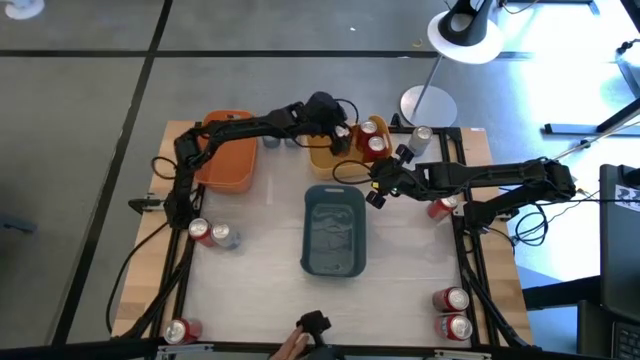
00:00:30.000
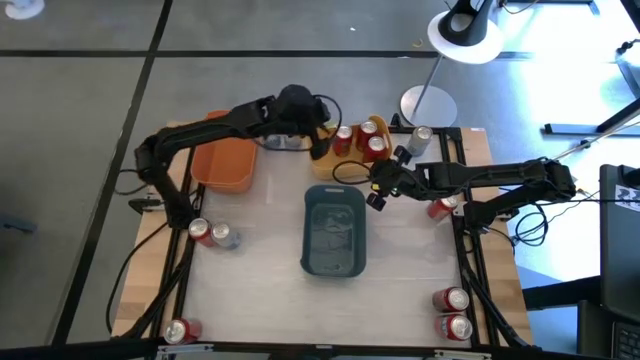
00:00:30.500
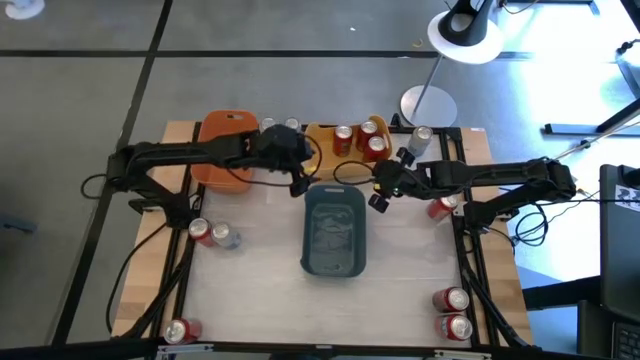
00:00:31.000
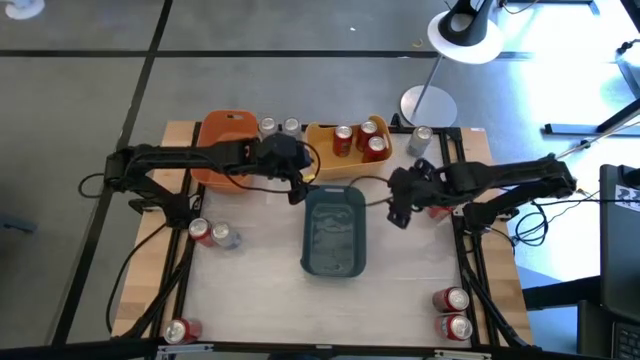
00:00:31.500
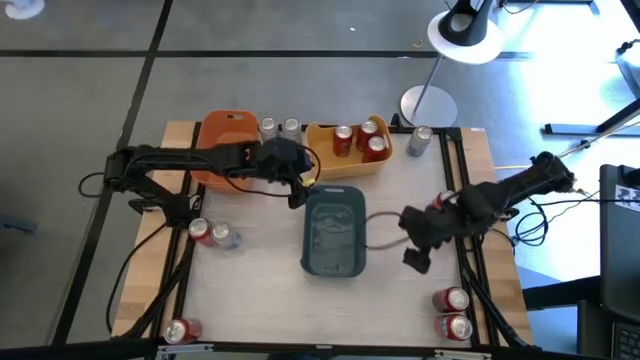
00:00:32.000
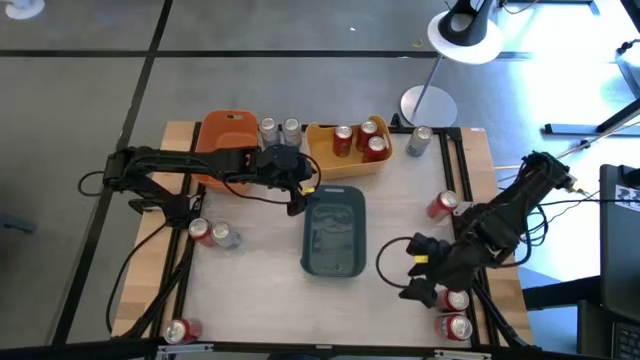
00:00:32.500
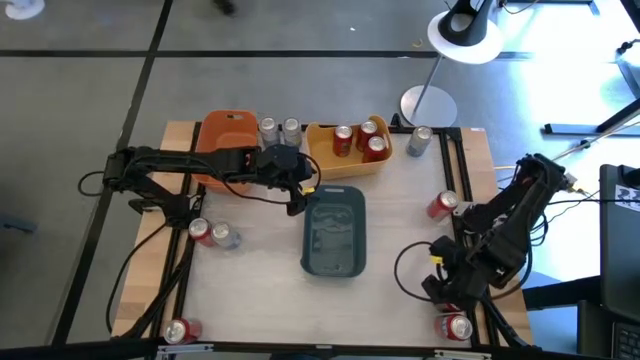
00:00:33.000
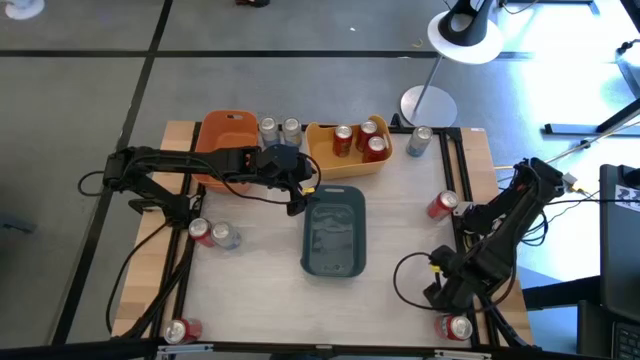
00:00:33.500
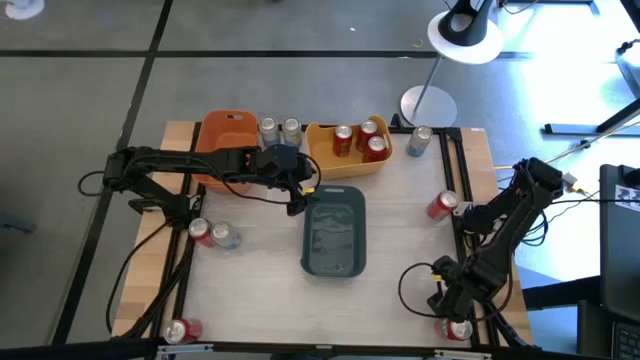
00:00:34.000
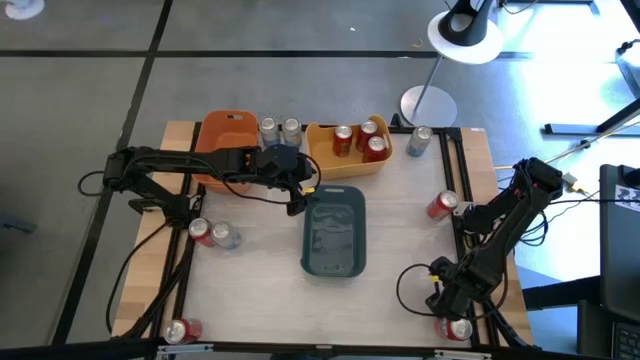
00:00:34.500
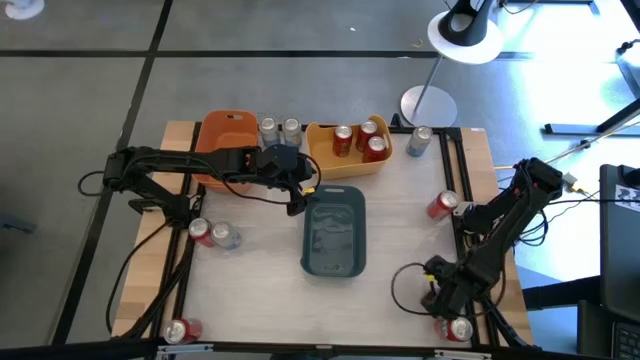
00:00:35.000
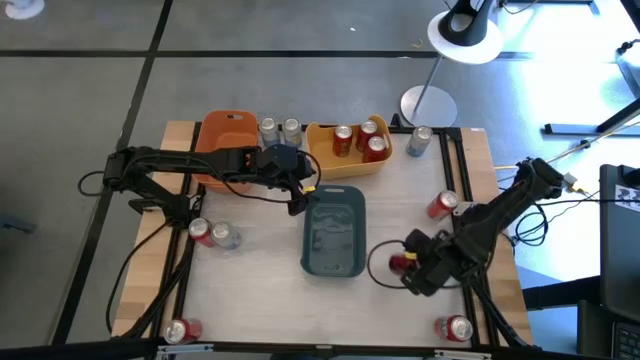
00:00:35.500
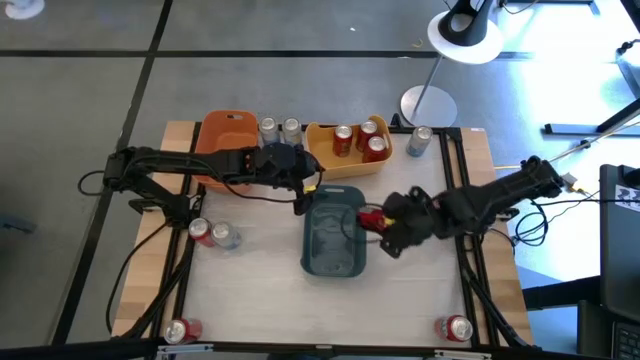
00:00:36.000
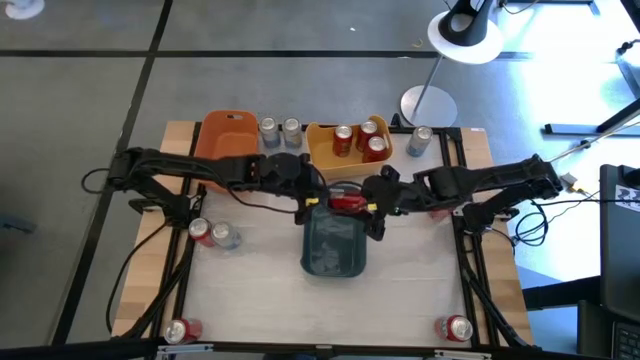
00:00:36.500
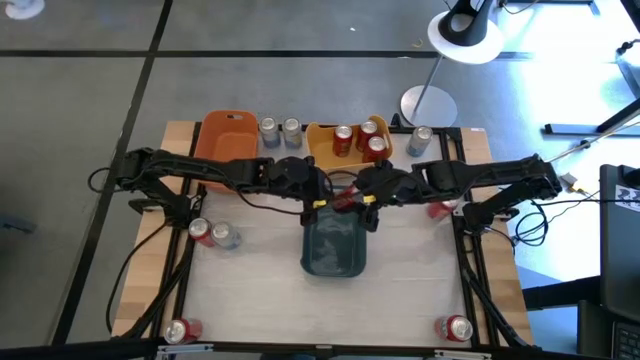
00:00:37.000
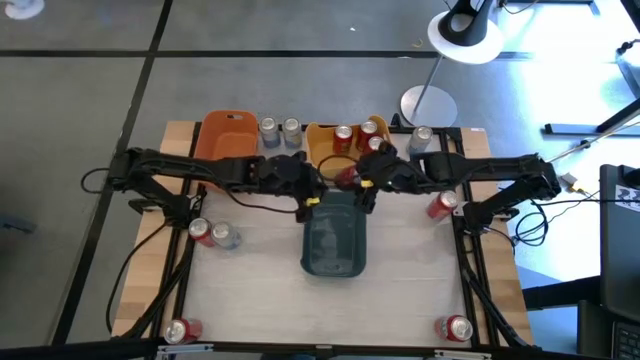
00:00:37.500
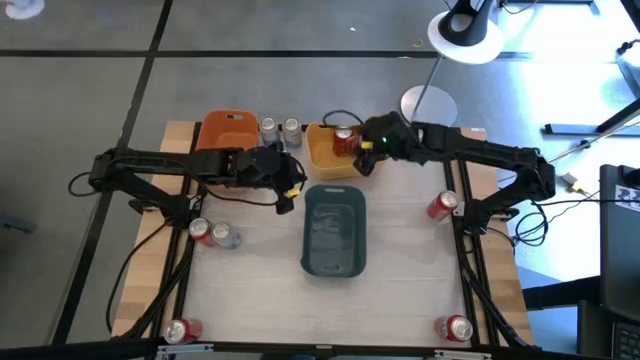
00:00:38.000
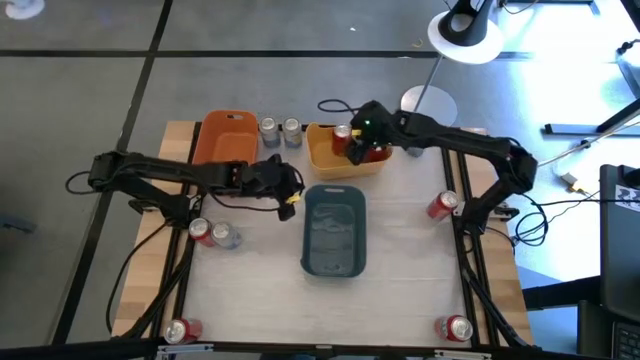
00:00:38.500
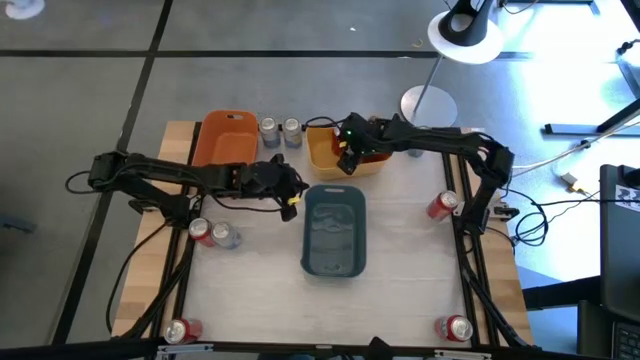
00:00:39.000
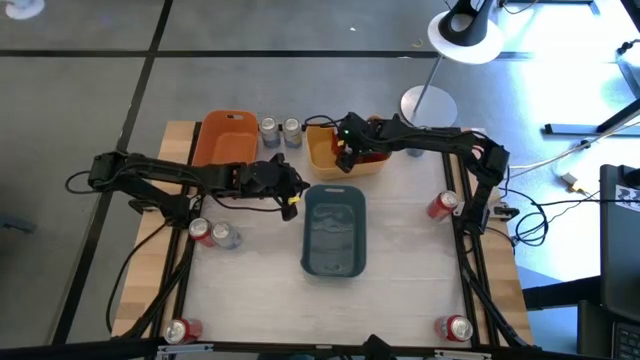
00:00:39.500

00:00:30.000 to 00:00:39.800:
Task: Sort soda cans
Put the red soda can into the yellow bin

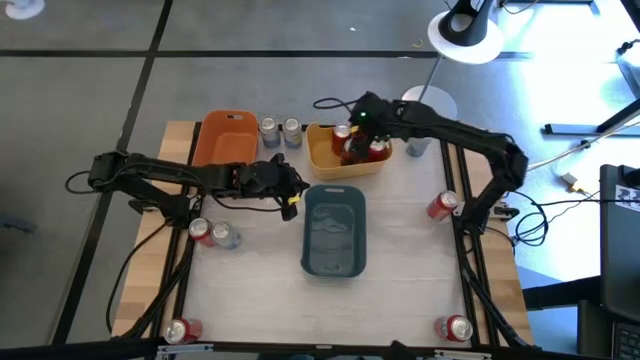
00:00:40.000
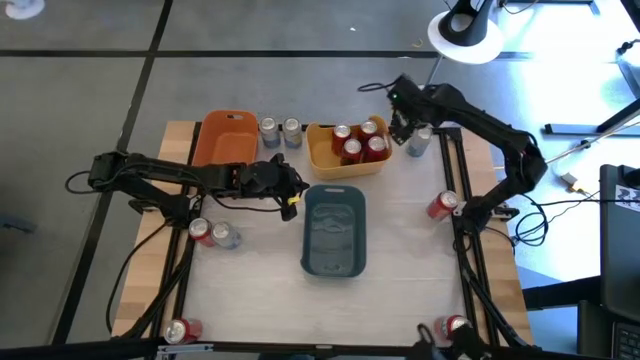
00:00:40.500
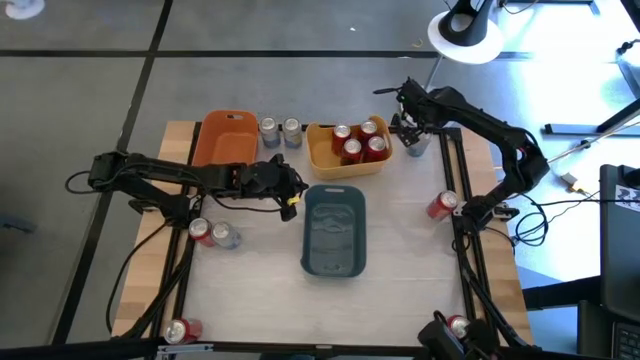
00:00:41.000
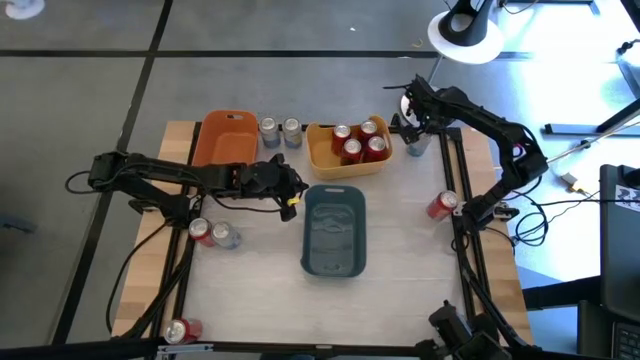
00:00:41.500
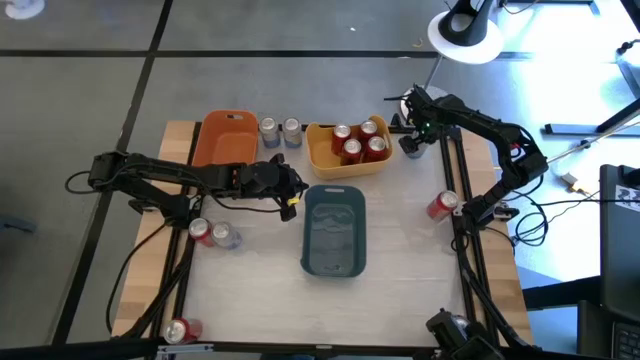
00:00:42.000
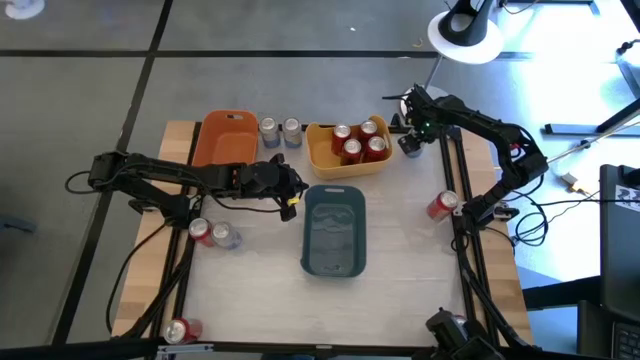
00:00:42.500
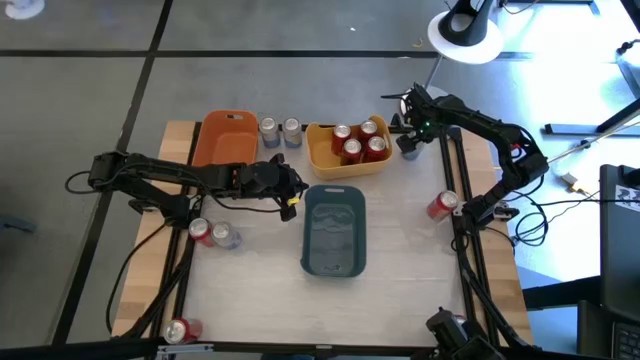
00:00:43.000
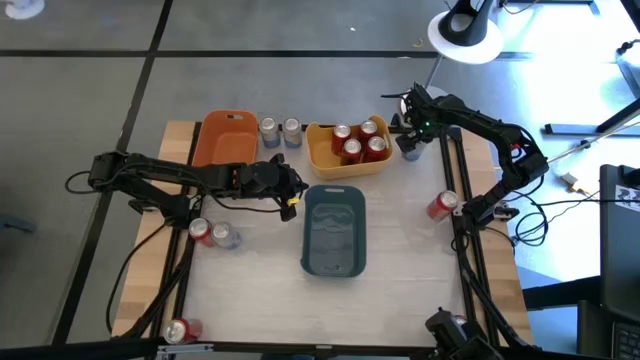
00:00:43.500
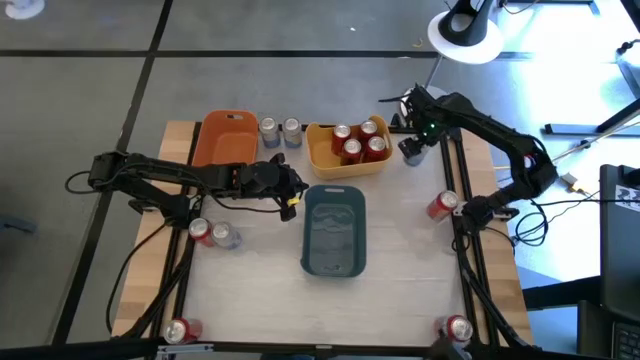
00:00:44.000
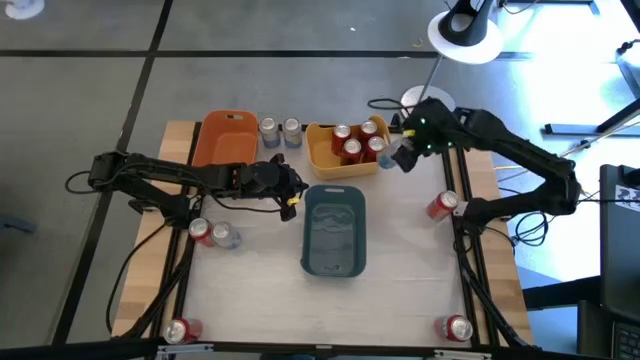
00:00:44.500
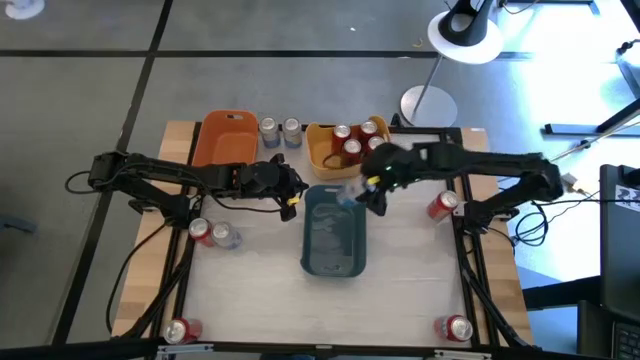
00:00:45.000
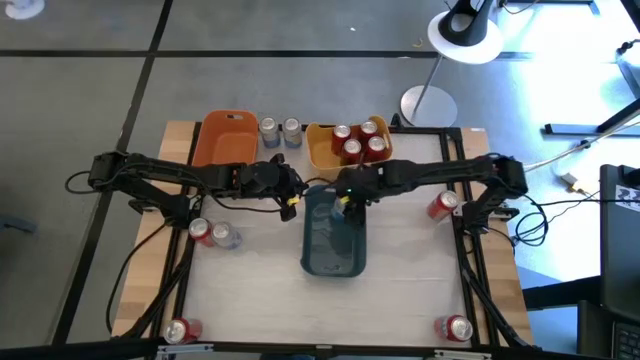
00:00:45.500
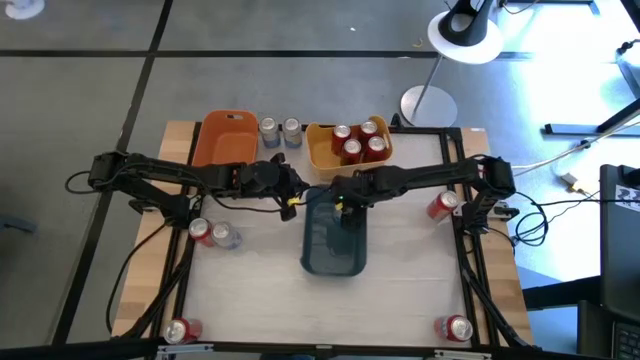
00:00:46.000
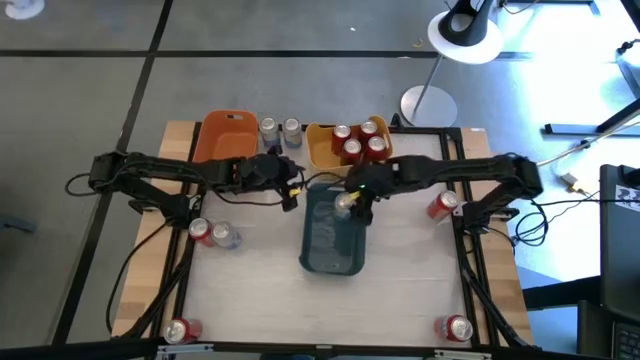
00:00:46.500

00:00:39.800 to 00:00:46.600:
Put the top right white soda can into the blue bin

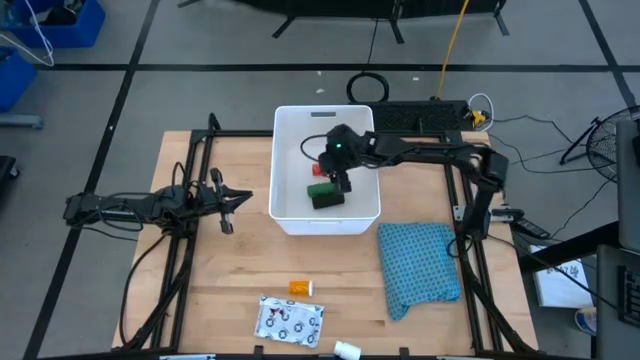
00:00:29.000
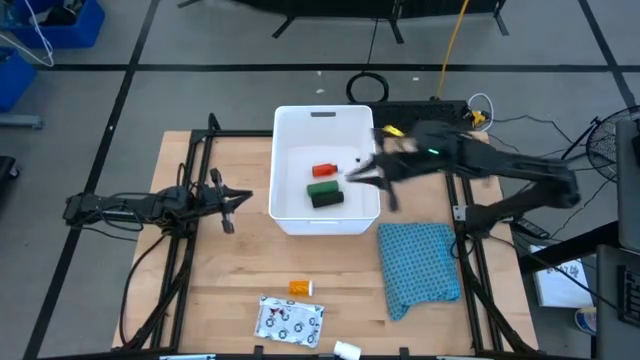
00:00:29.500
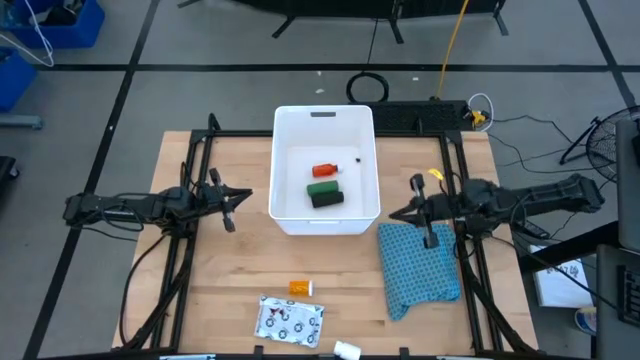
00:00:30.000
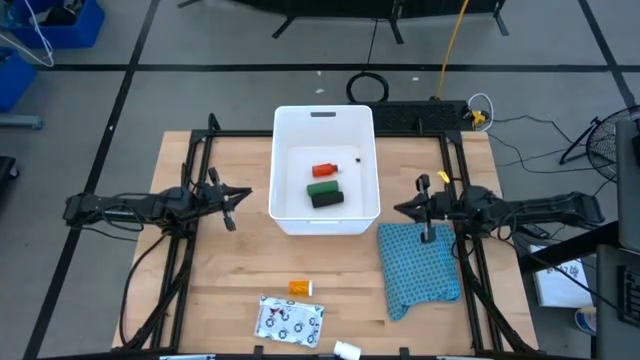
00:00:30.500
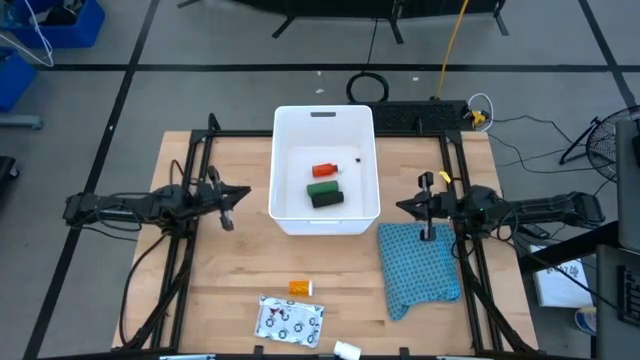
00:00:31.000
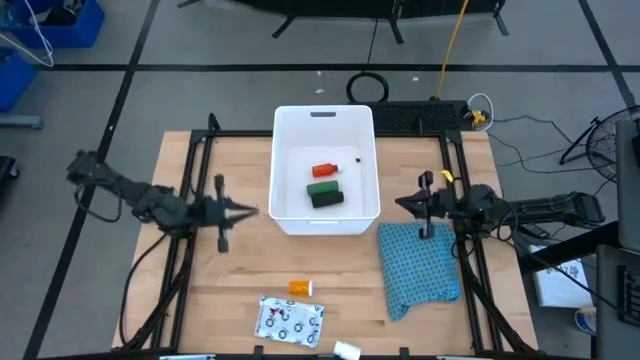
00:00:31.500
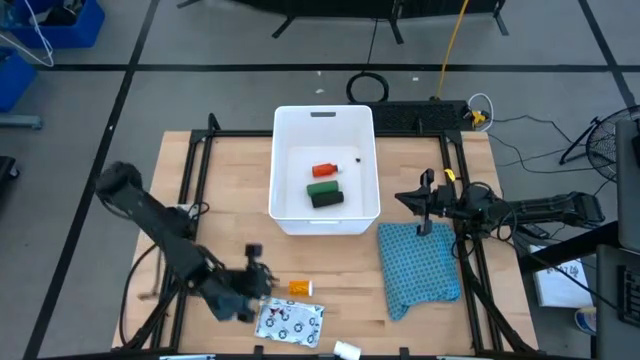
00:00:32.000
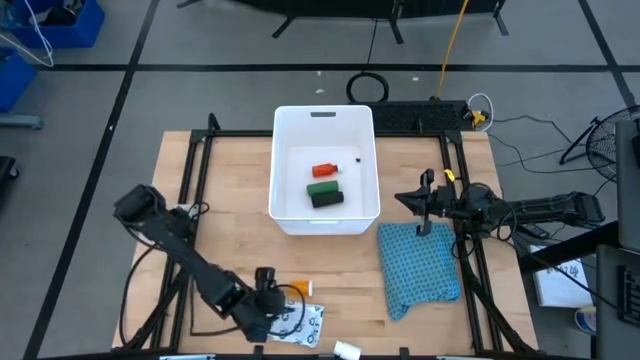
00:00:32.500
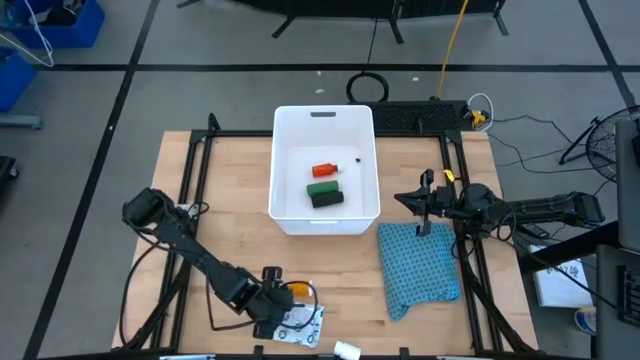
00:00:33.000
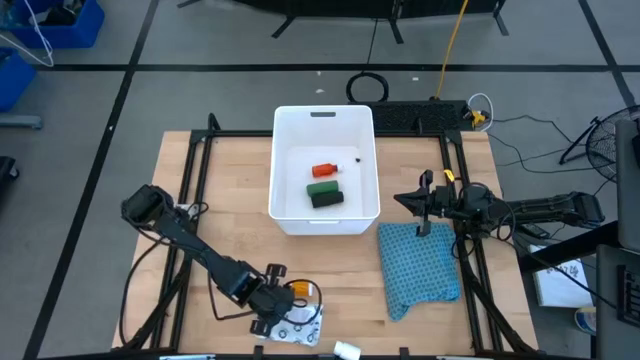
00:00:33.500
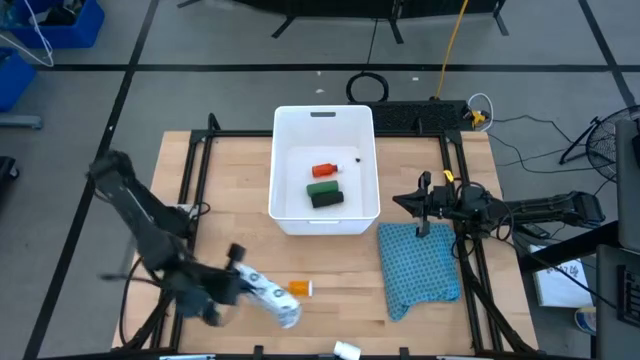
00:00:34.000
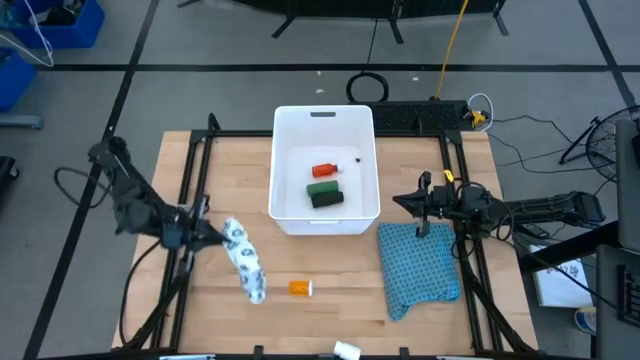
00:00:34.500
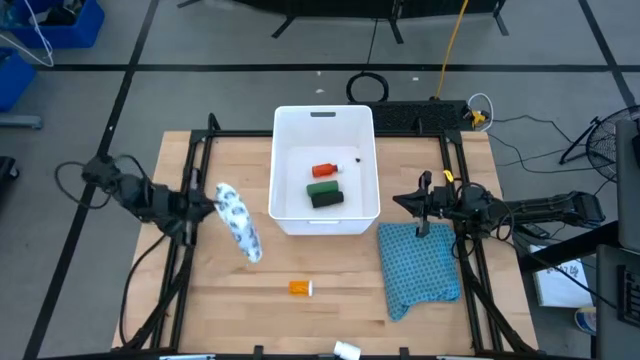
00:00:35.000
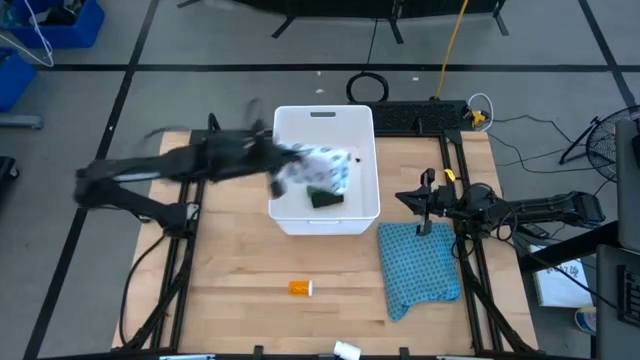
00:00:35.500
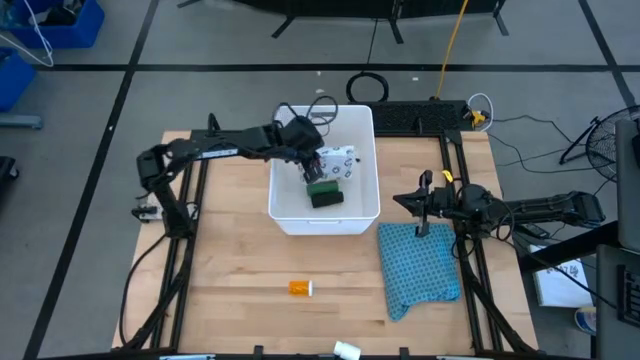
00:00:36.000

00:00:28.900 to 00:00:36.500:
Task: Pick & place medical supplies in basket/bin
Put the mailer bag into the bin
